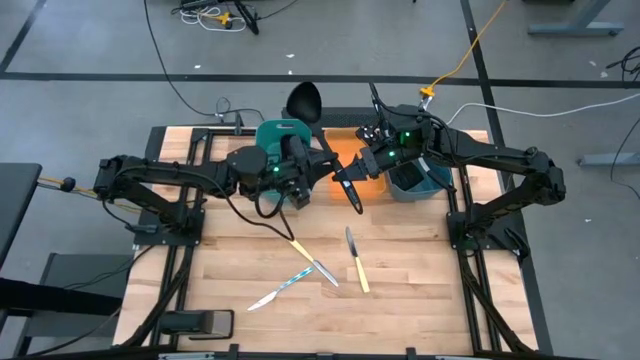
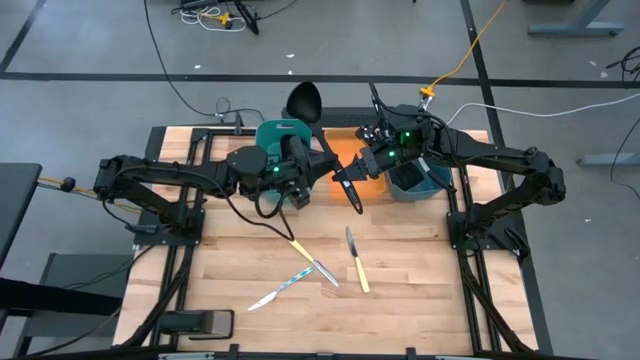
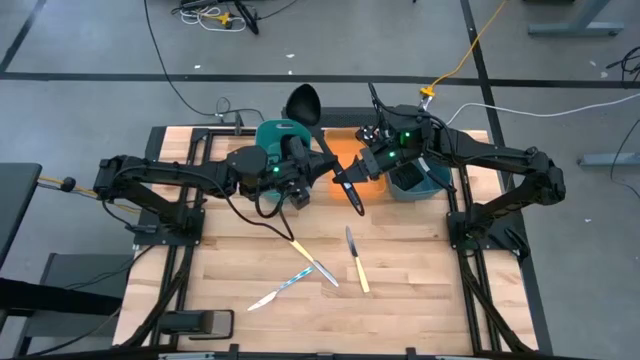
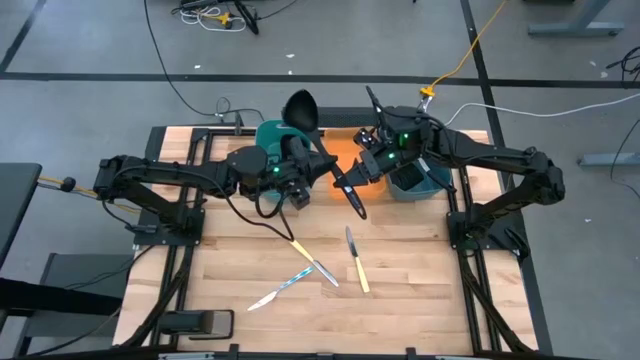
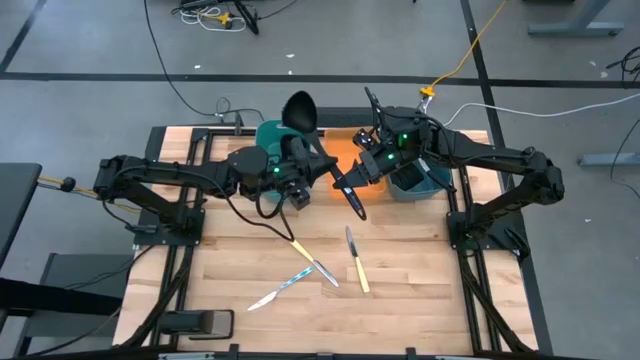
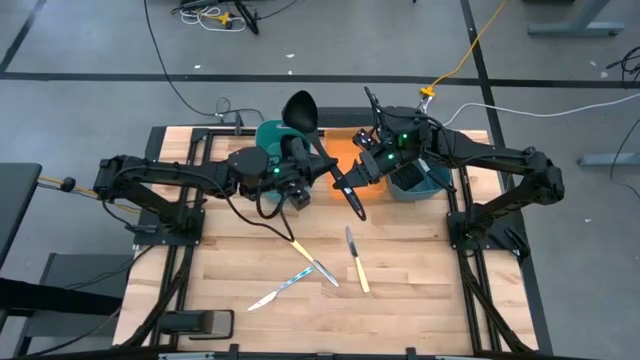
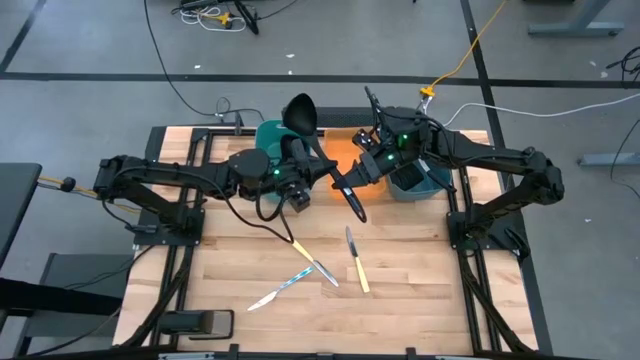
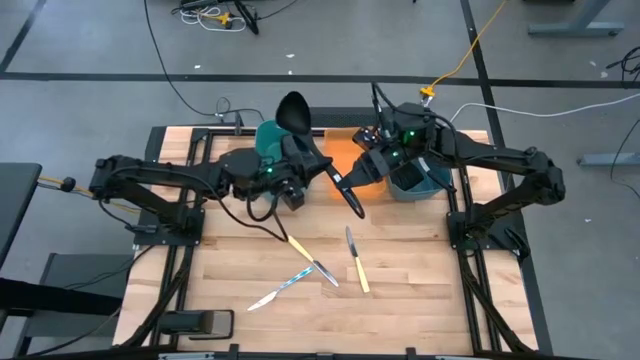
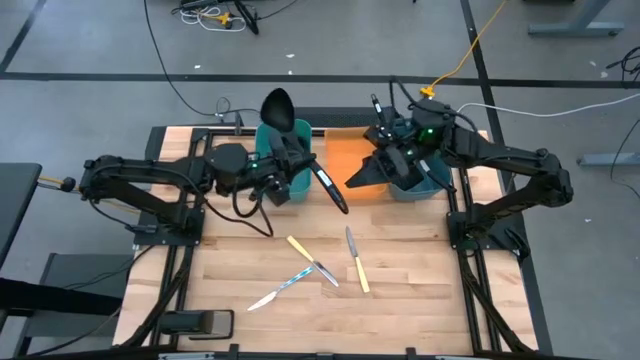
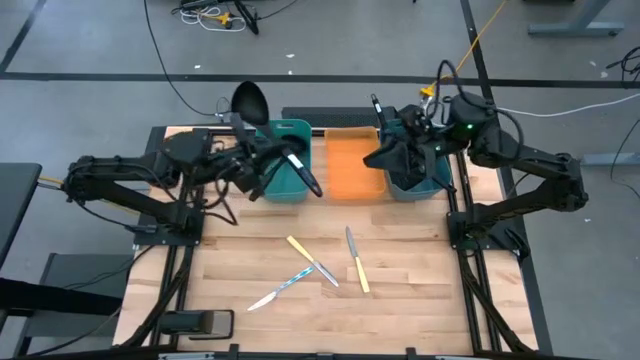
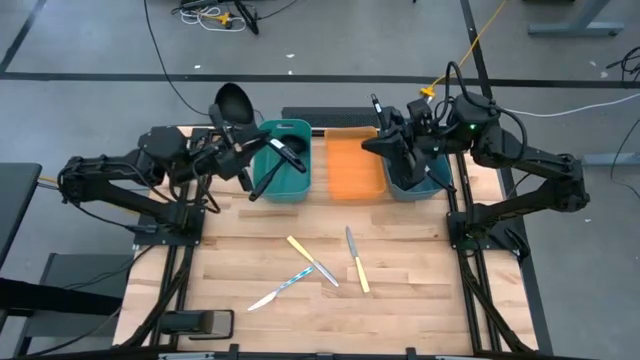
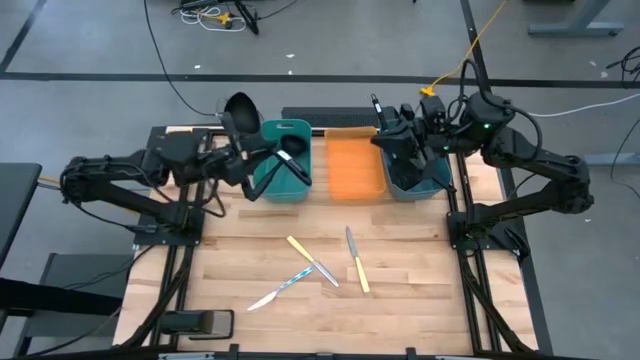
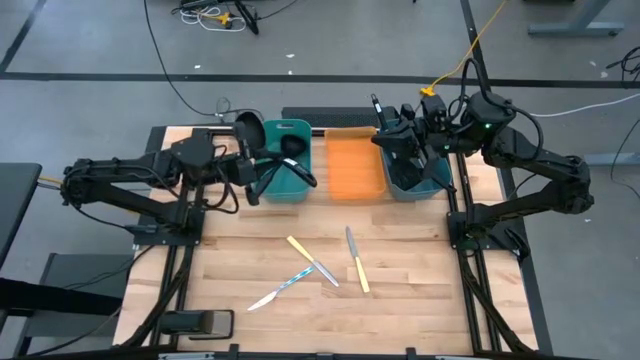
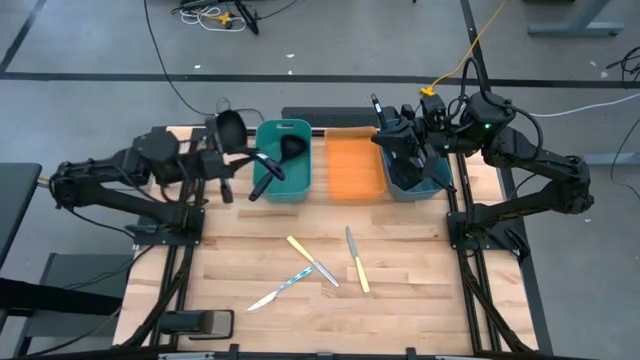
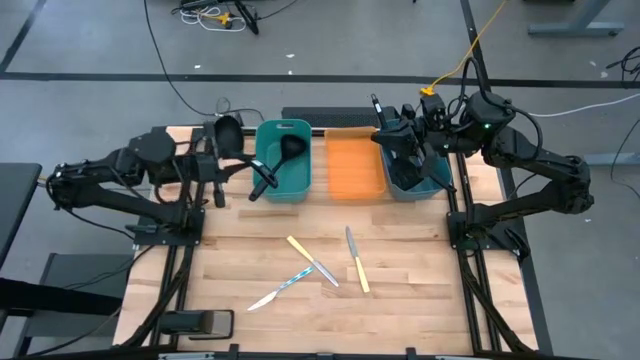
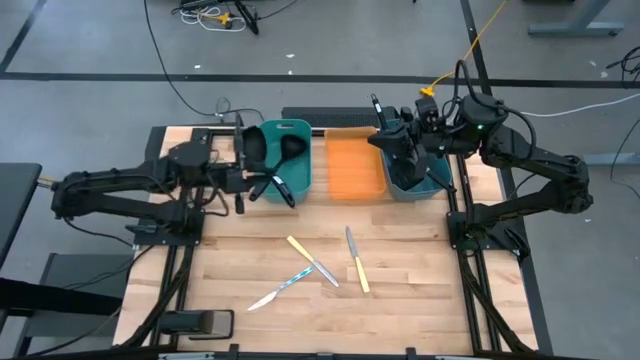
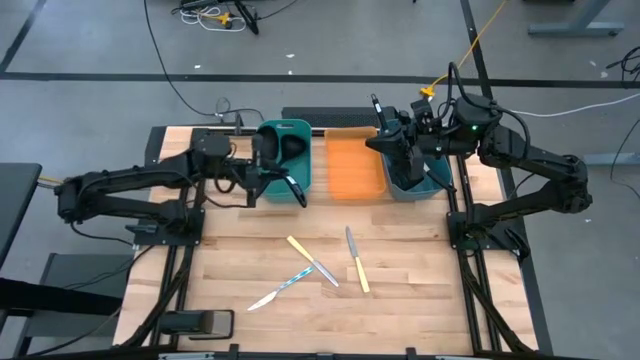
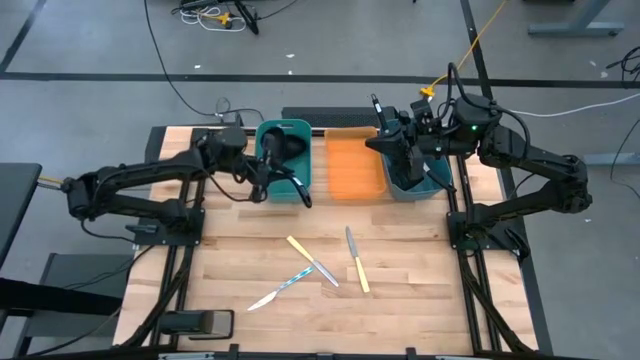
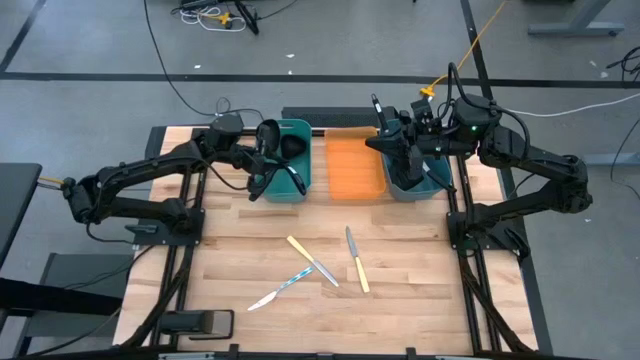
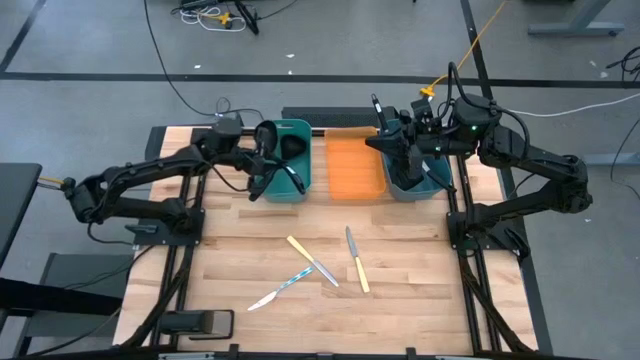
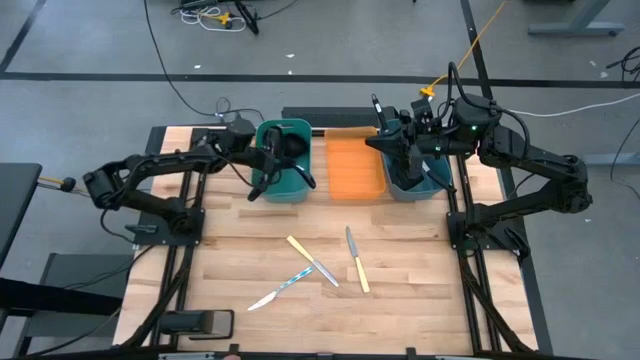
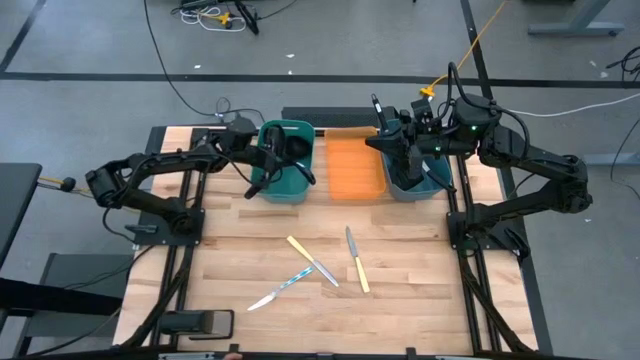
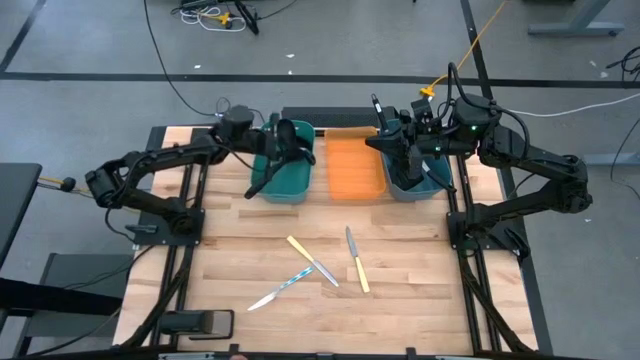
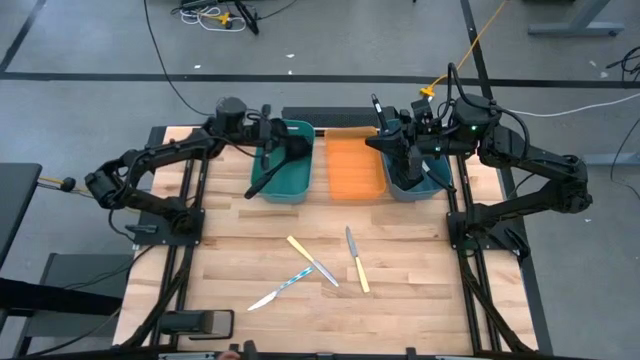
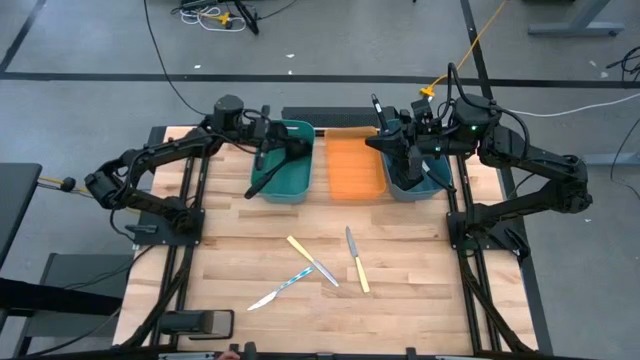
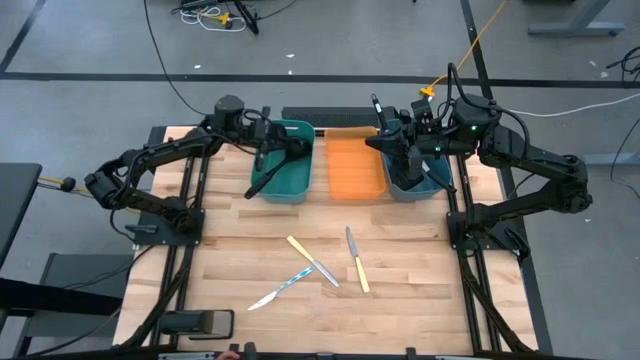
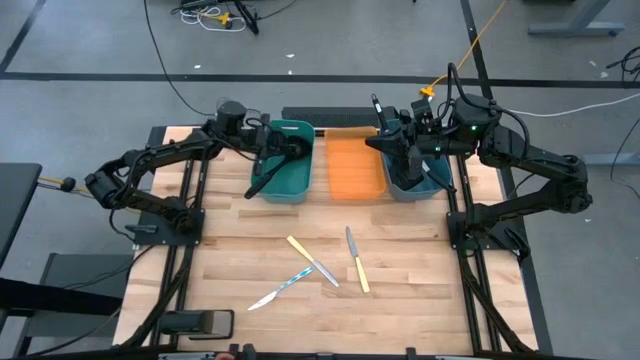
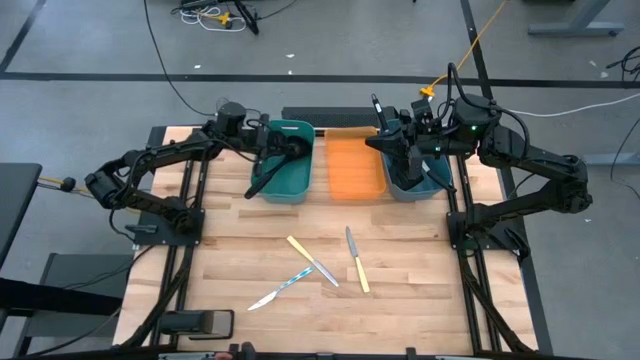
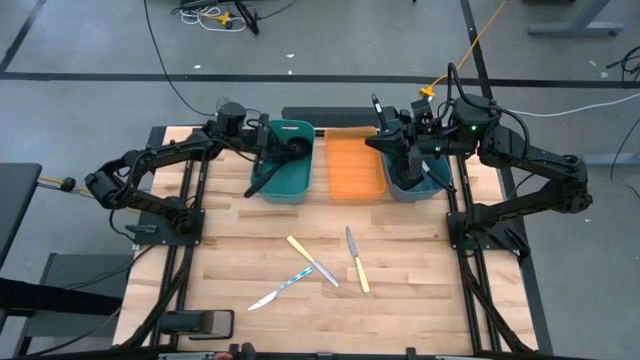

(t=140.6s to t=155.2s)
Task: Pick & Place Kitchen Items
Put the black serving spoon into the light green bin

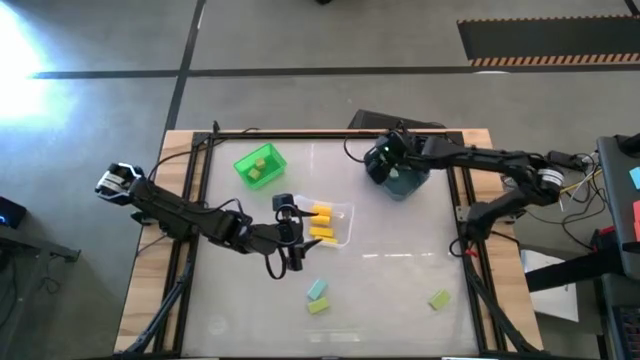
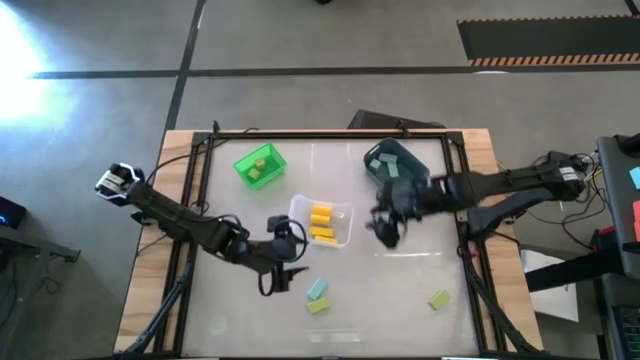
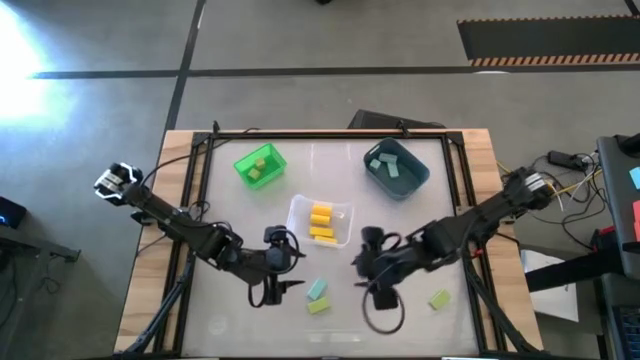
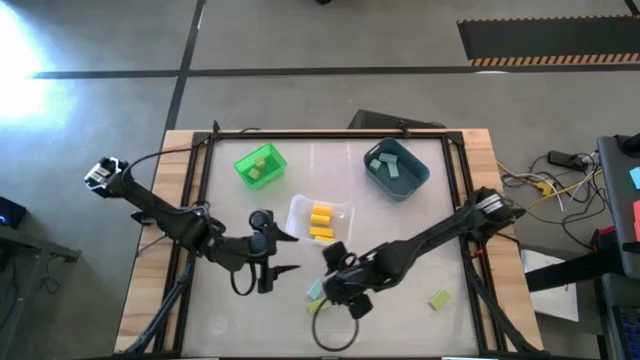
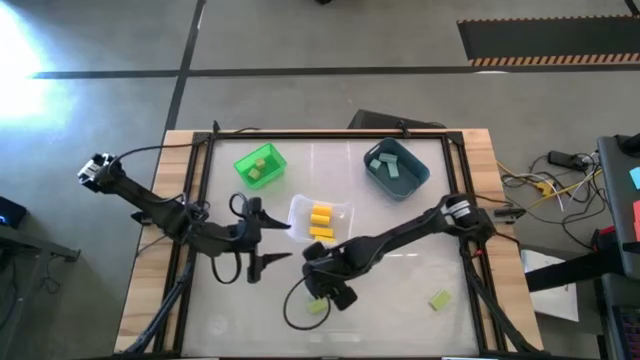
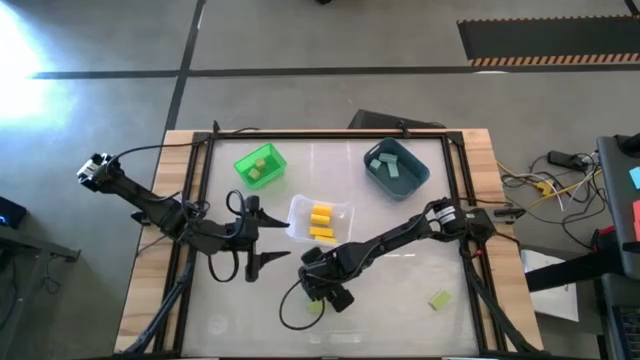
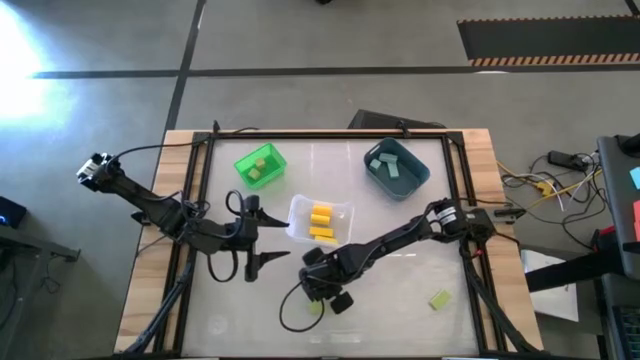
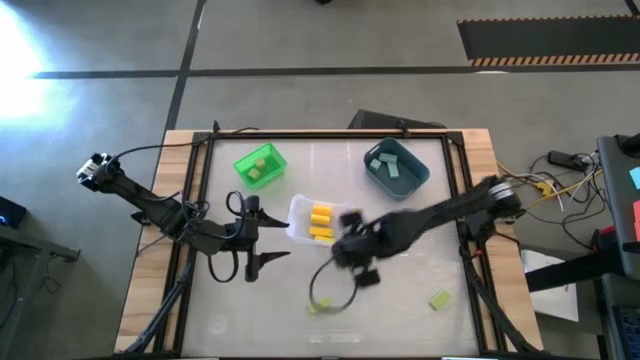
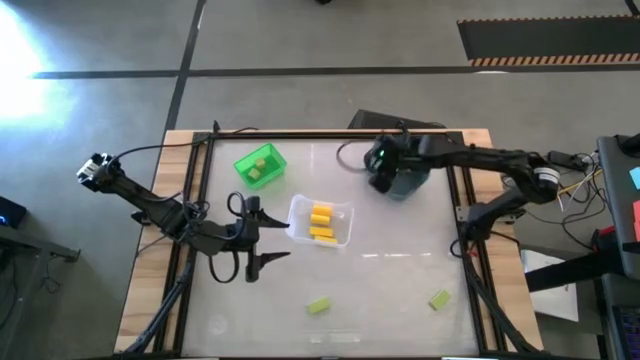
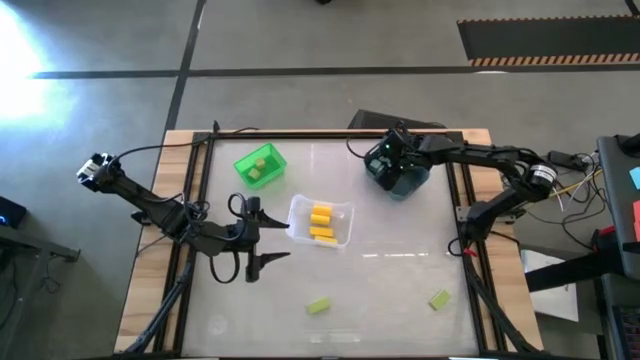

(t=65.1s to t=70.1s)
Task: Sort & place blocks by color
Put the blue block into the blue bin

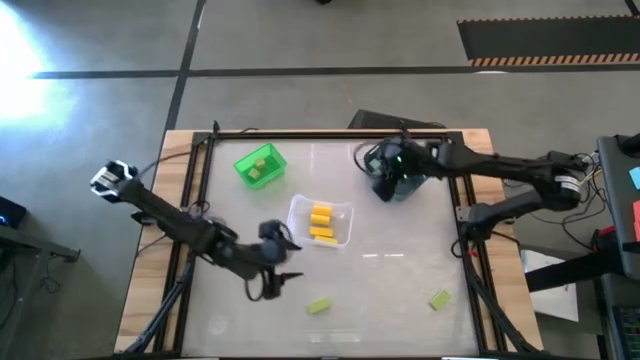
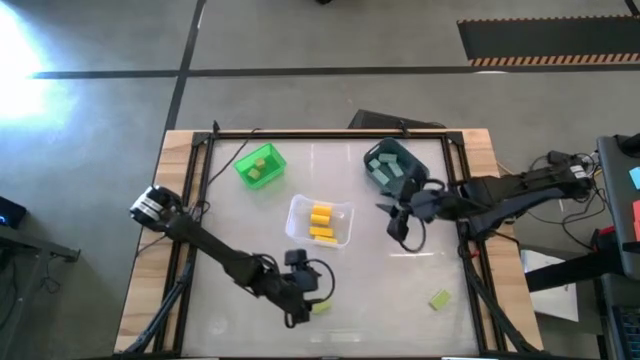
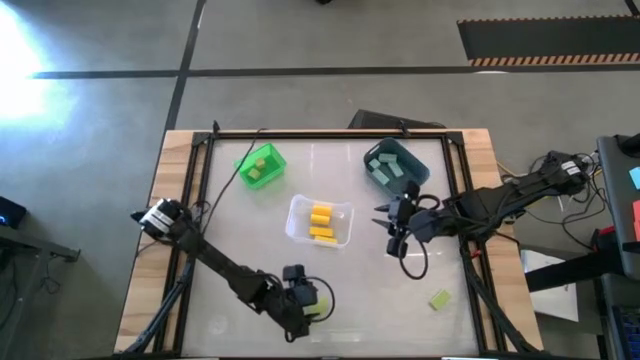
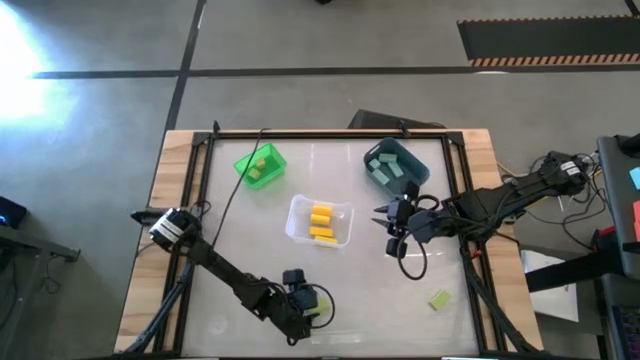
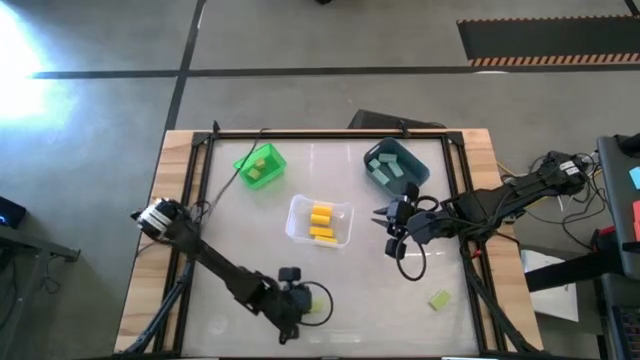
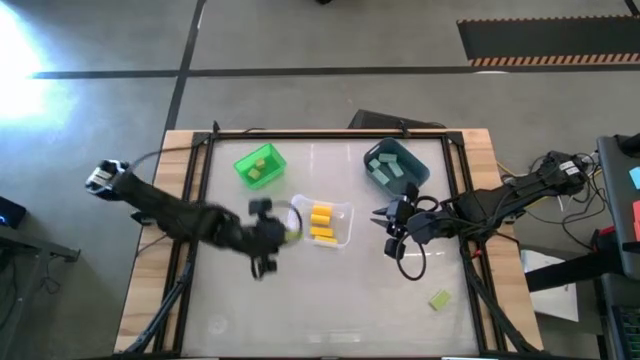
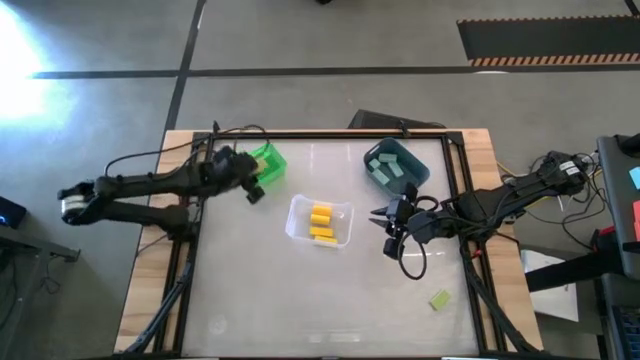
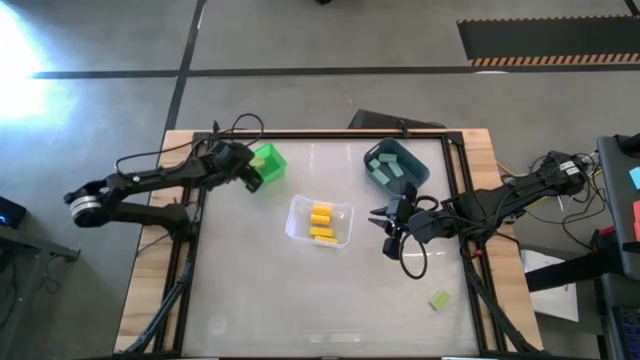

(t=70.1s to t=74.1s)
Put the green block into the green bin
